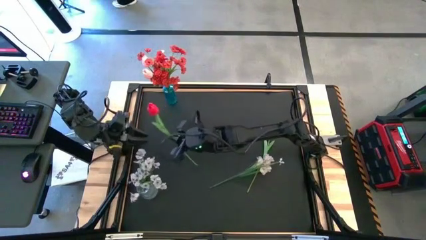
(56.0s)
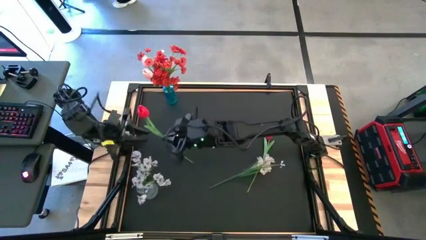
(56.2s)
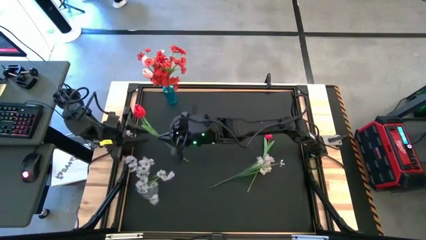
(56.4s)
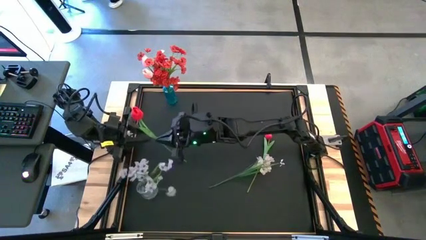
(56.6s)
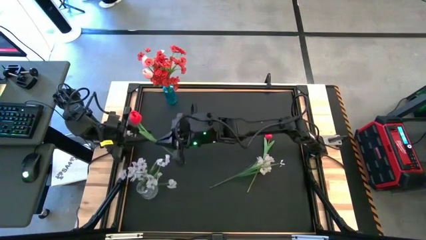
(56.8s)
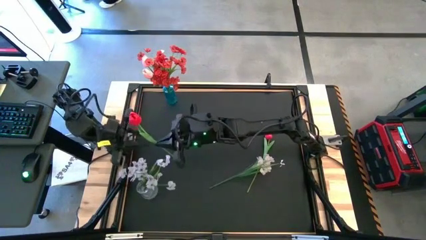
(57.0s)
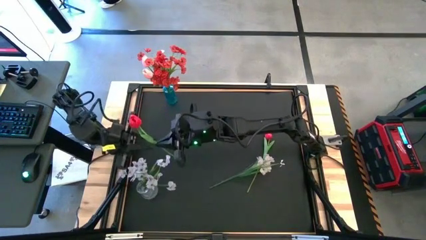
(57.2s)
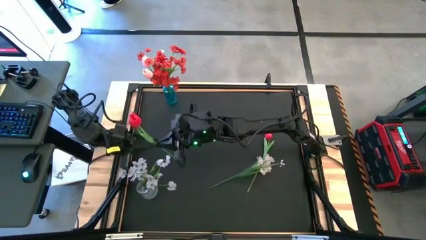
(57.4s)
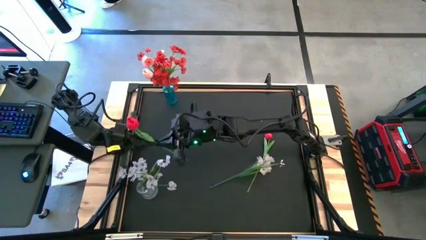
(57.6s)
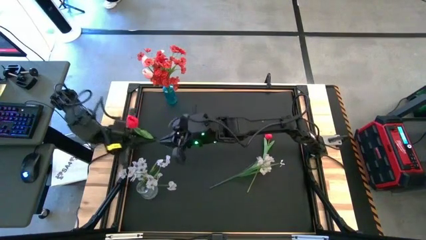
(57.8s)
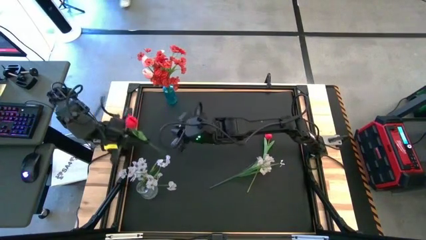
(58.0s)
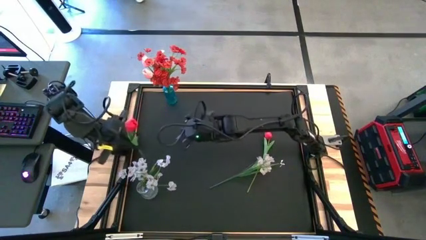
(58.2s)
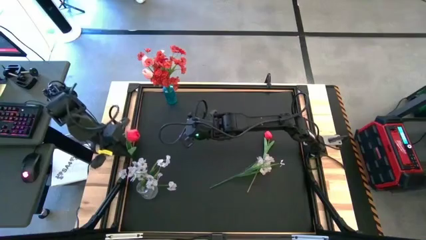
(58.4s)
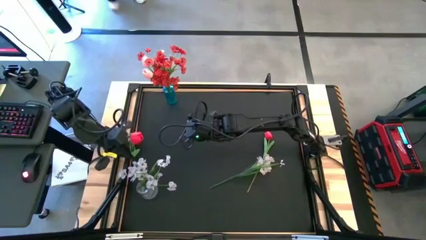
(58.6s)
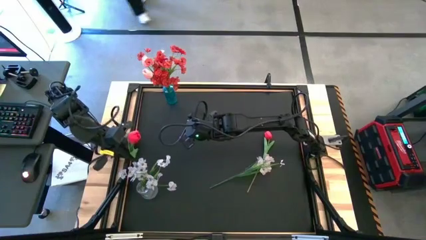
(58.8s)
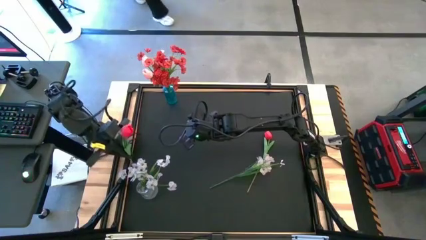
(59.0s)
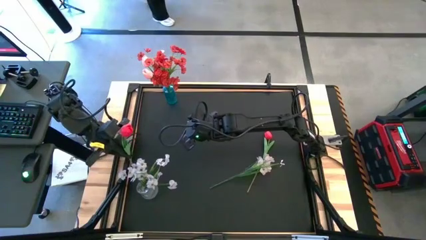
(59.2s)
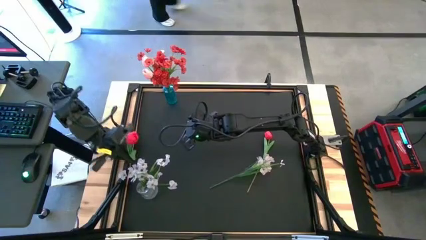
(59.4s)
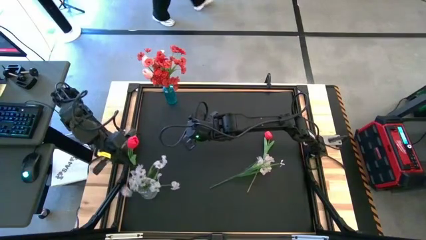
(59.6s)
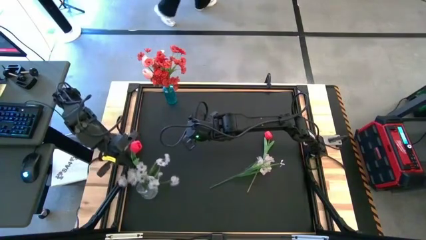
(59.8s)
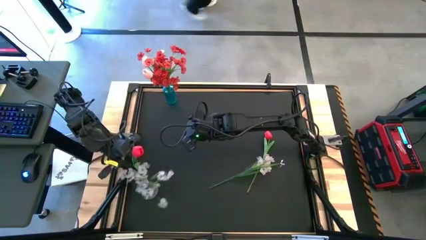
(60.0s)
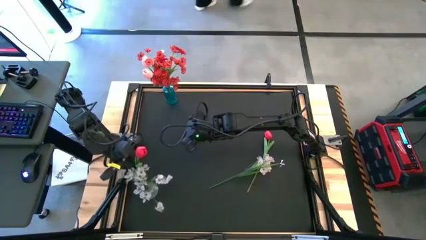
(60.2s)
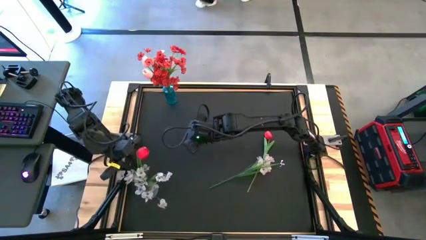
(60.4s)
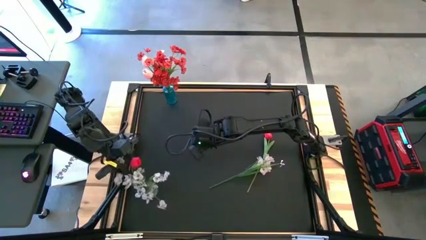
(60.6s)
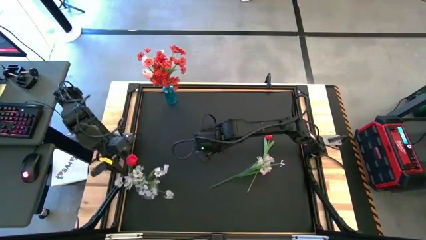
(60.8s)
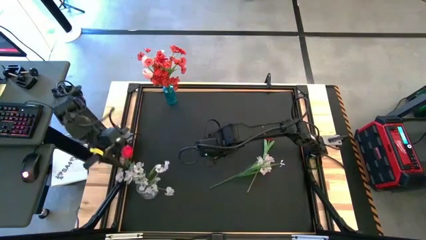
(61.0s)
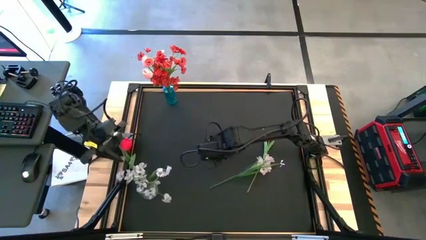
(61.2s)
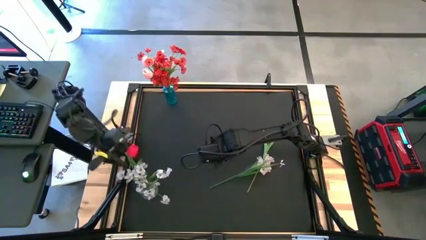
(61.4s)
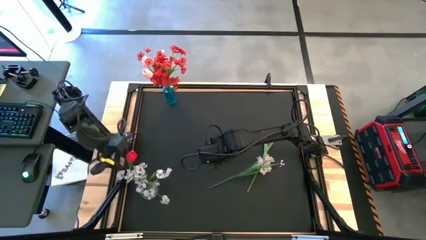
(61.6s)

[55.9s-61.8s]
Task: Sort flowers into vase by color
Put the left red tulip into the transparent vase

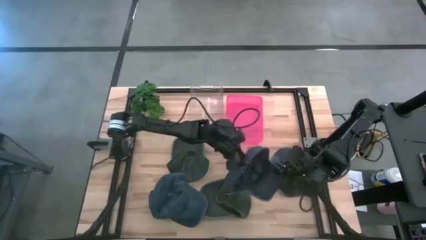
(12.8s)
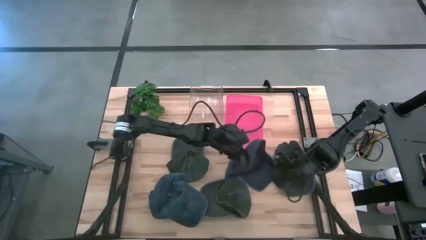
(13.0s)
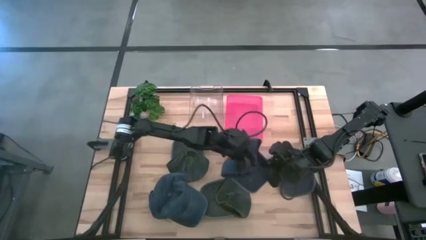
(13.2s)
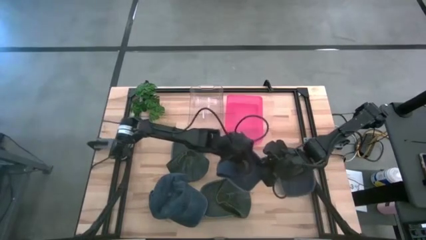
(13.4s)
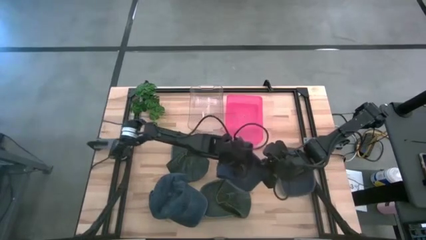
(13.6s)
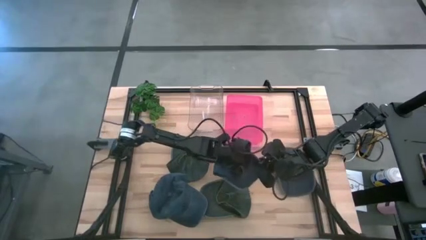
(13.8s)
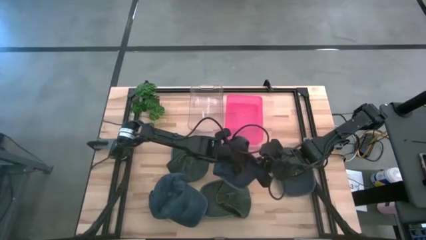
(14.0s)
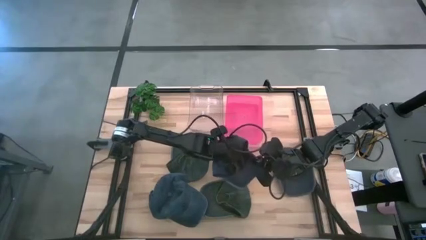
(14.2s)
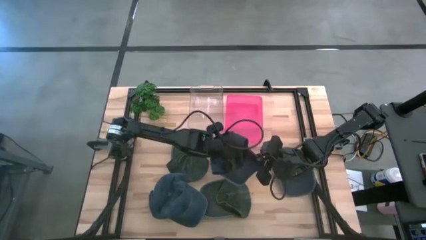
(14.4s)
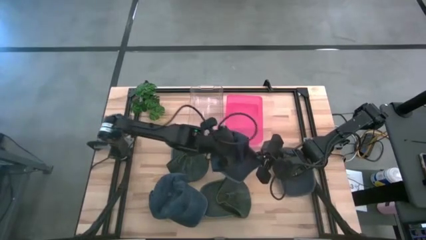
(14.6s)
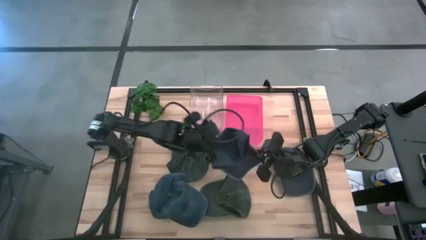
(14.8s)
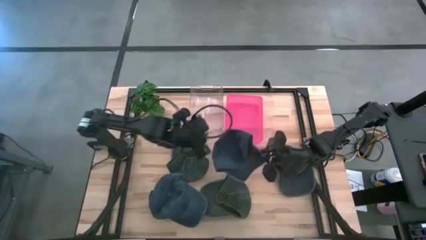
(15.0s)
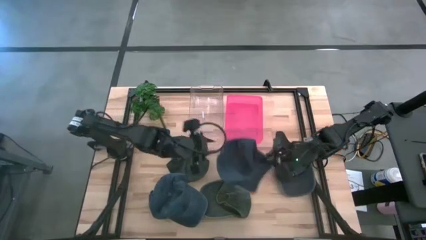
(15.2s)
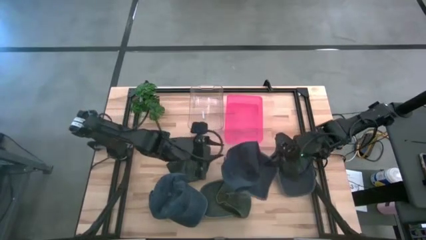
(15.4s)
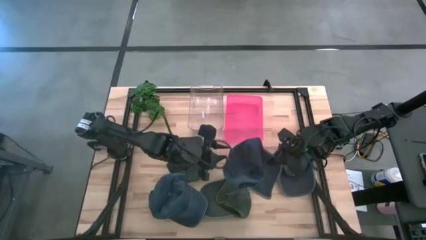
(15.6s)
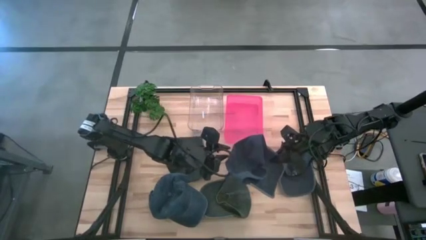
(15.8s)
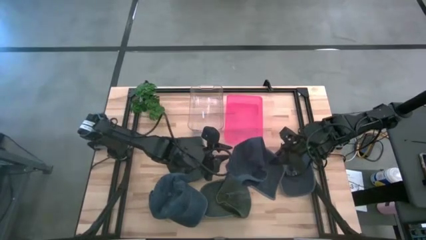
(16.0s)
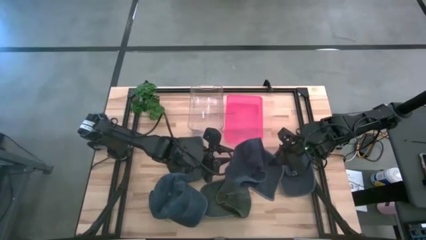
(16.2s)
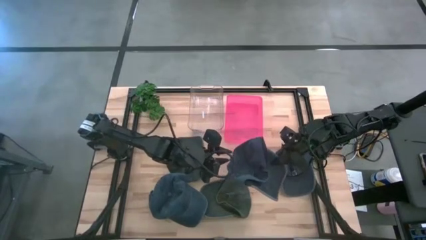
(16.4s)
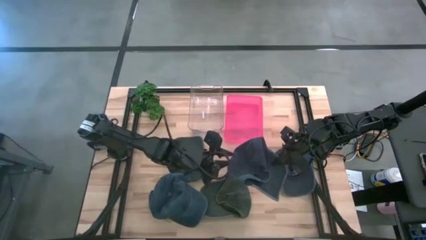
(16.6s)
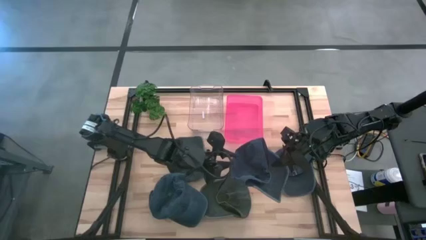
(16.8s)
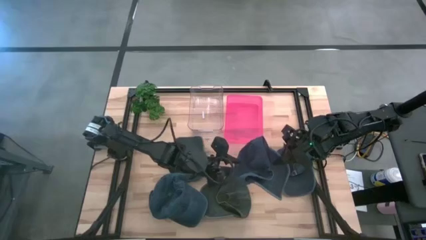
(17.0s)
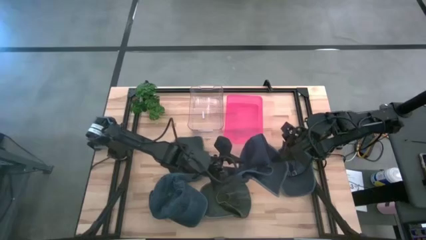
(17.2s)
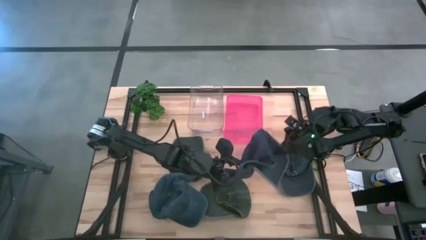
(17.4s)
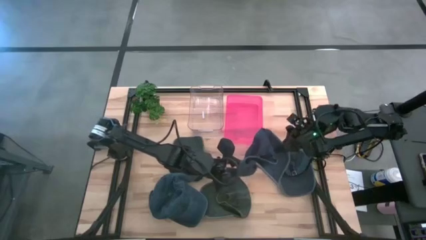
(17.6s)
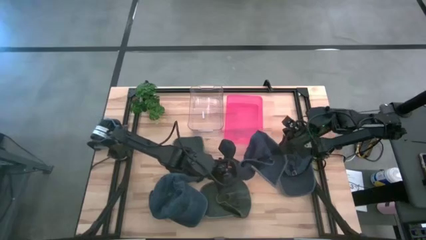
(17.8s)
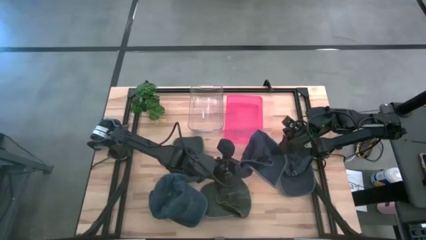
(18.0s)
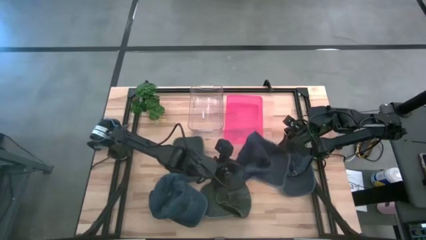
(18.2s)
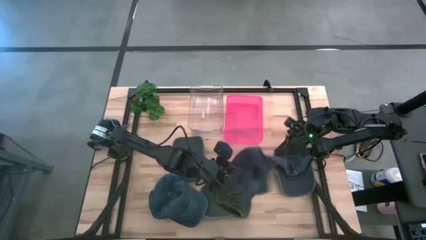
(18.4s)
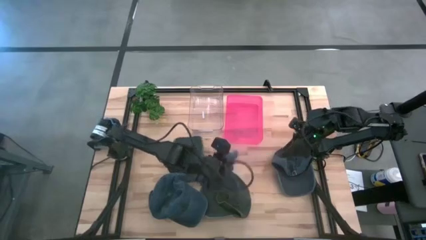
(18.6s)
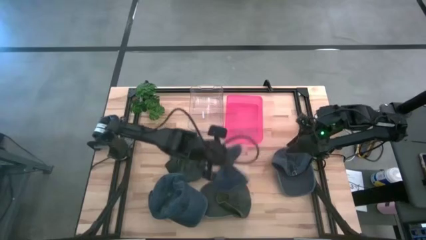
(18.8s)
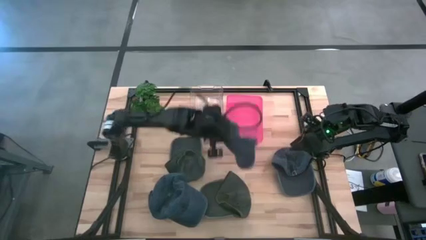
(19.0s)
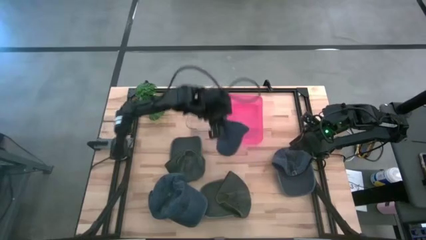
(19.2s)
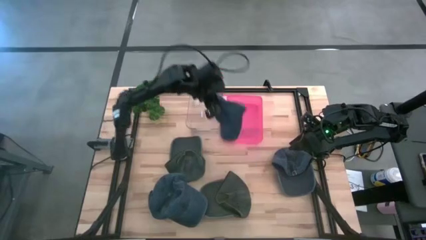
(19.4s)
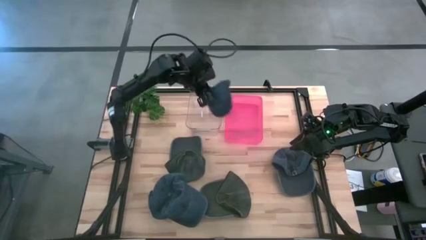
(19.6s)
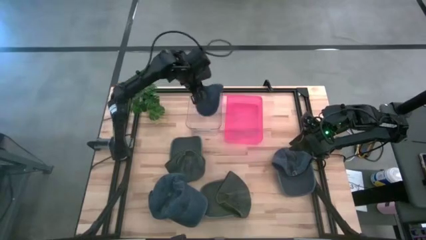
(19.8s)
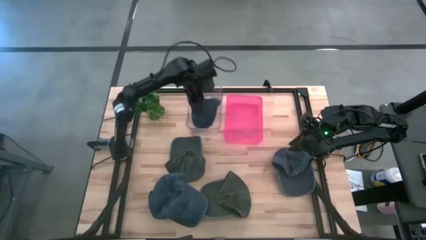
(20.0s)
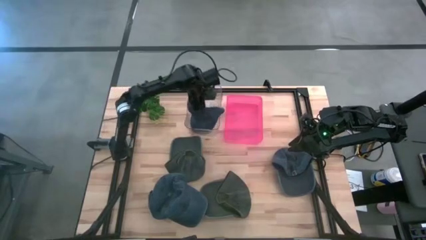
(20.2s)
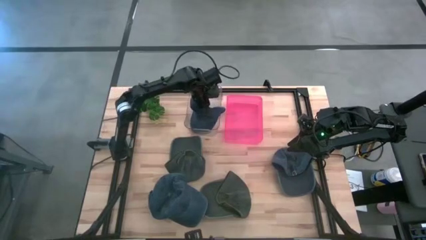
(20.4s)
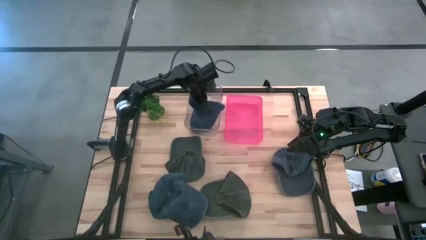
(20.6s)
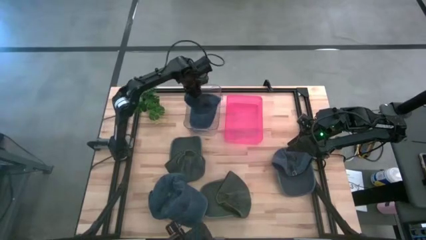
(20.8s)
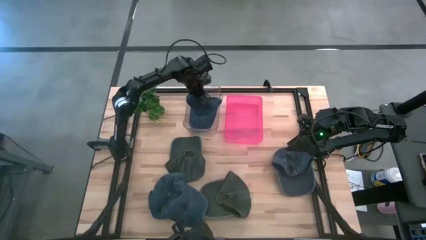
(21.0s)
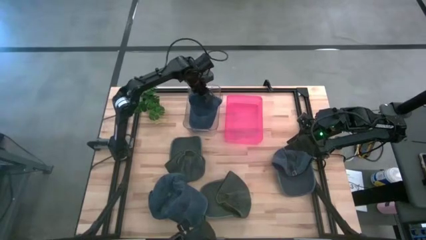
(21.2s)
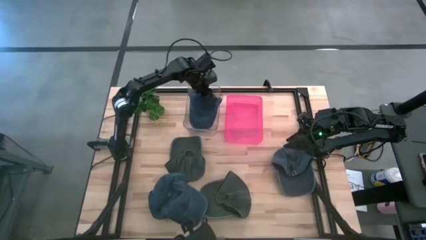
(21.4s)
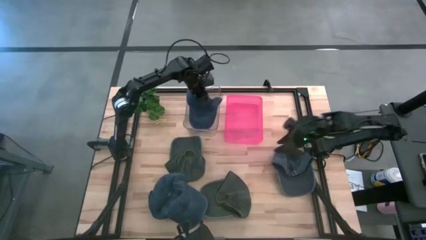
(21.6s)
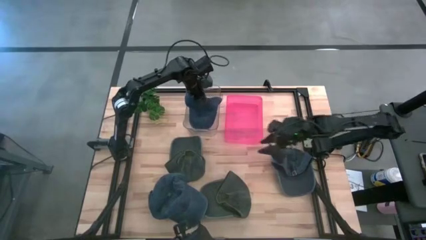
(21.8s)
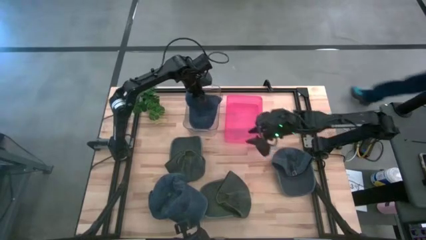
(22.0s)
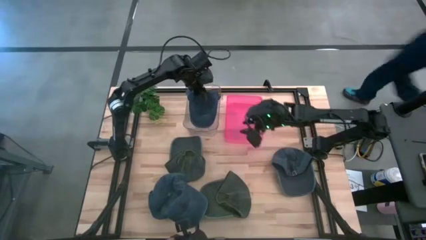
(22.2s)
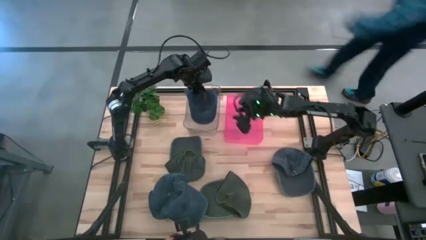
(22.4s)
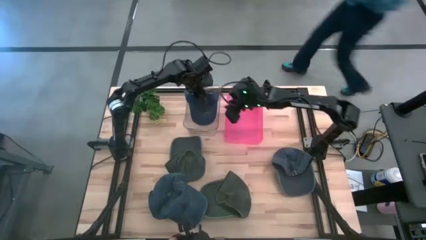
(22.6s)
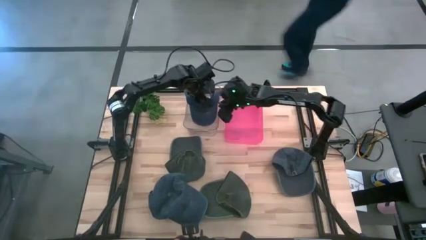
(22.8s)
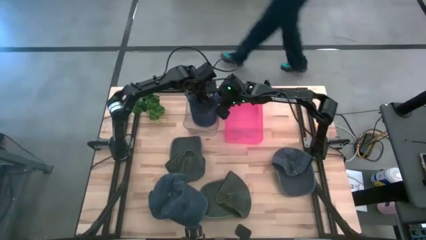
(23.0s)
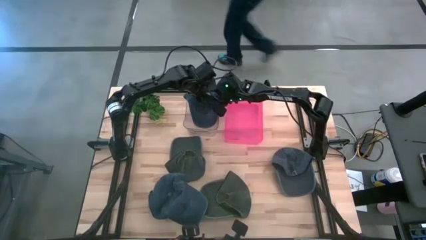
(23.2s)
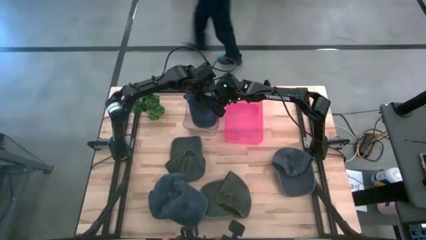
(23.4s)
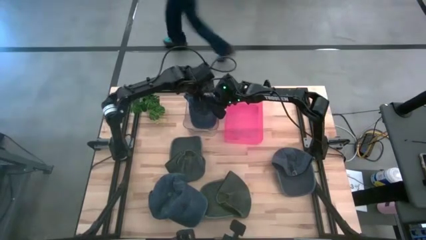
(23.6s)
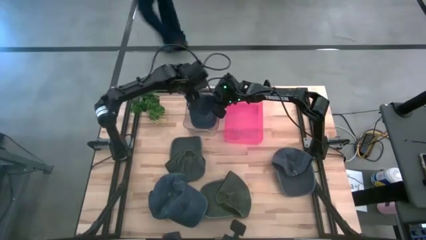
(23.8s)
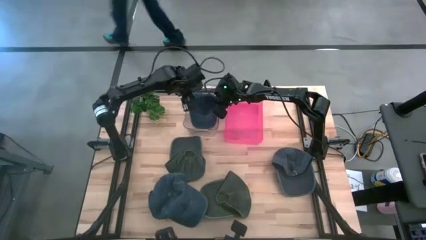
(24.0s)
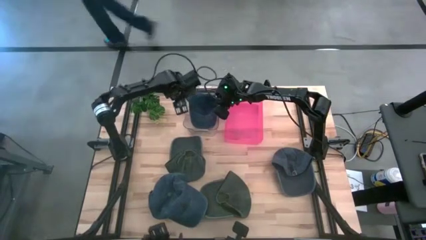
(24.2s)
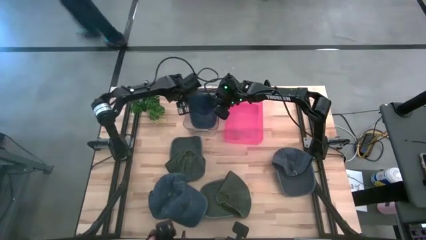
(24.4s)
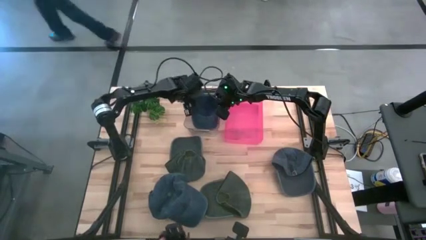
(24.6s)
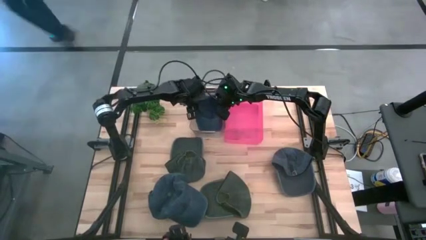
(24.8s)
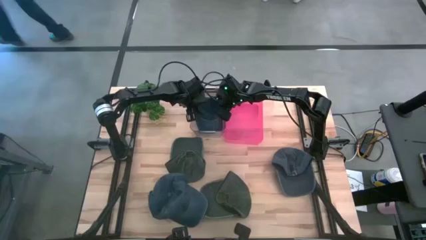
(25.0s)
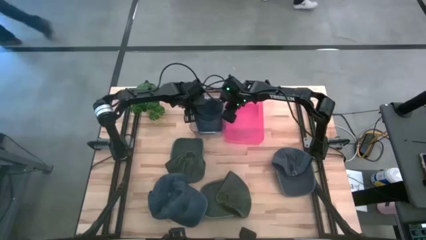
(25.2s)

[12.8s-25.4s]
Task: Pick & Place hat
Put the middle blue cap into the transparent bin
